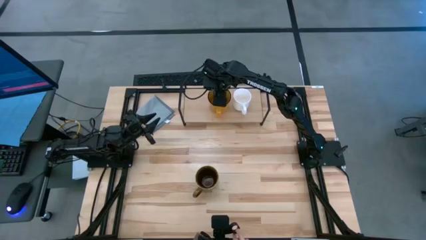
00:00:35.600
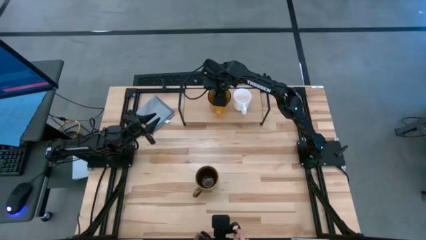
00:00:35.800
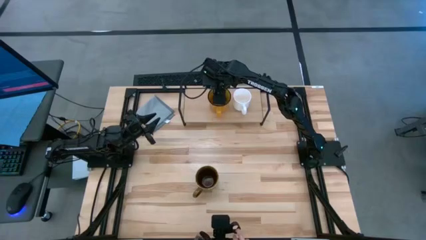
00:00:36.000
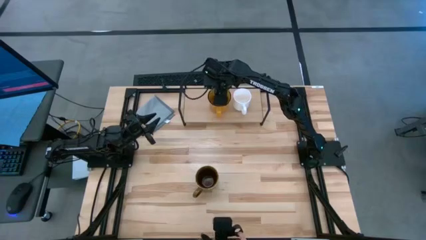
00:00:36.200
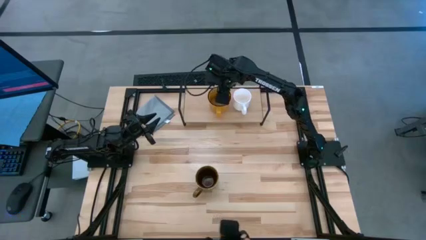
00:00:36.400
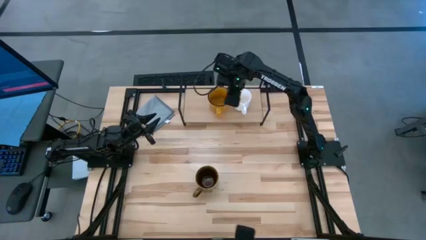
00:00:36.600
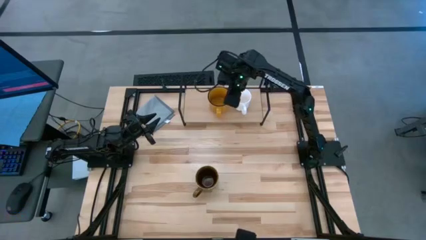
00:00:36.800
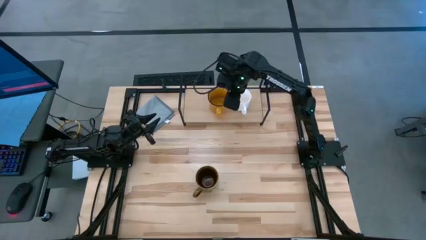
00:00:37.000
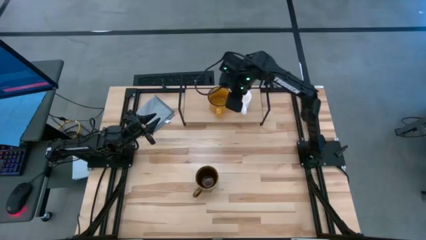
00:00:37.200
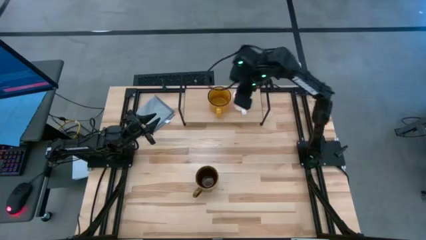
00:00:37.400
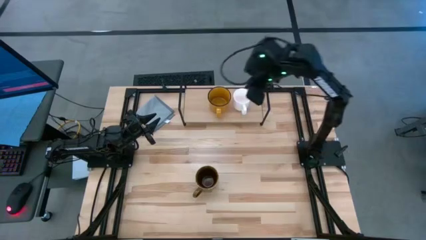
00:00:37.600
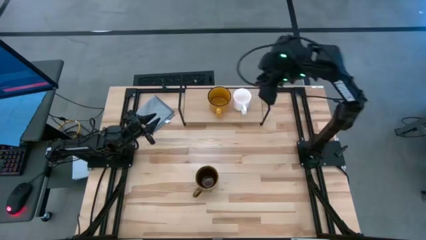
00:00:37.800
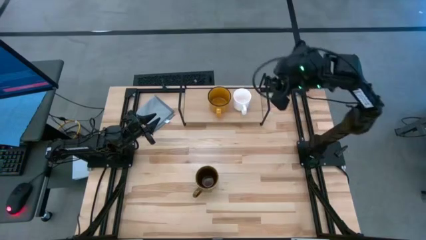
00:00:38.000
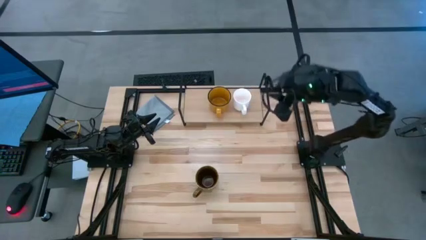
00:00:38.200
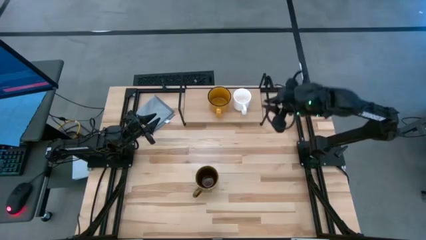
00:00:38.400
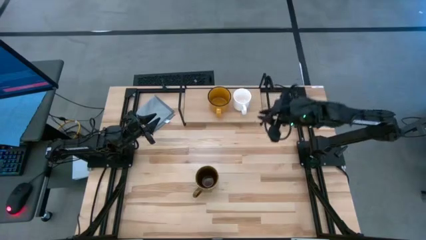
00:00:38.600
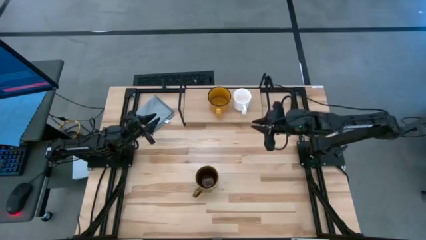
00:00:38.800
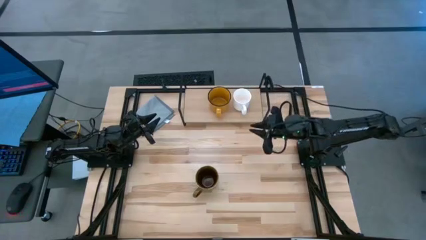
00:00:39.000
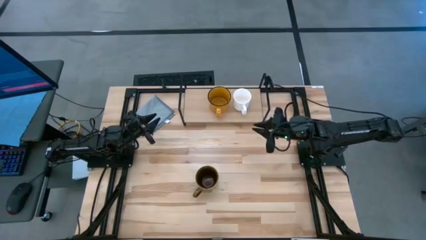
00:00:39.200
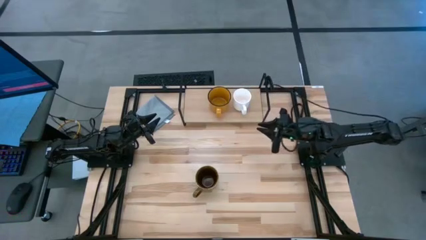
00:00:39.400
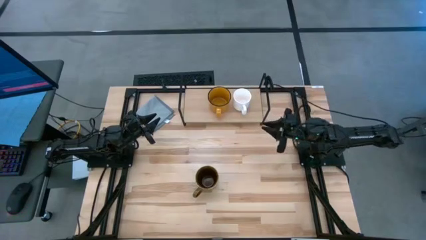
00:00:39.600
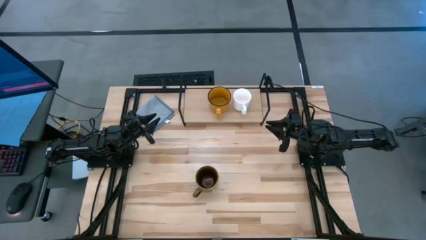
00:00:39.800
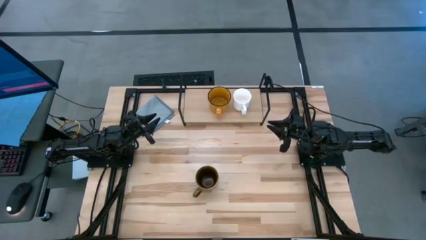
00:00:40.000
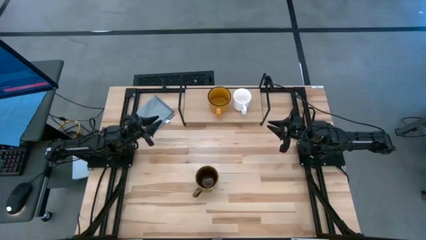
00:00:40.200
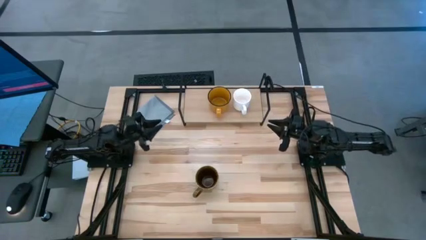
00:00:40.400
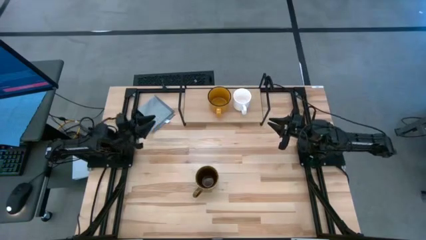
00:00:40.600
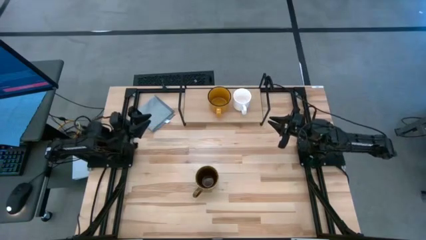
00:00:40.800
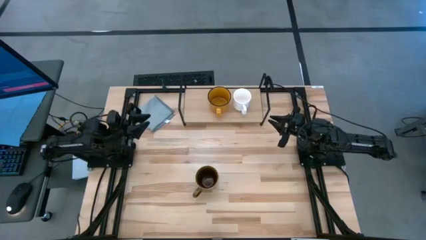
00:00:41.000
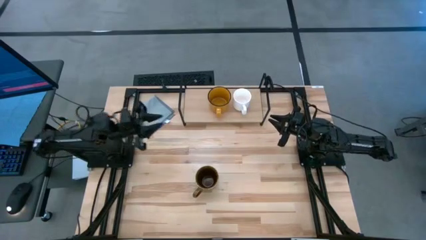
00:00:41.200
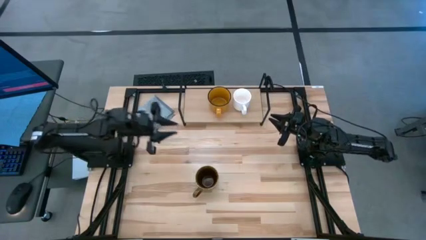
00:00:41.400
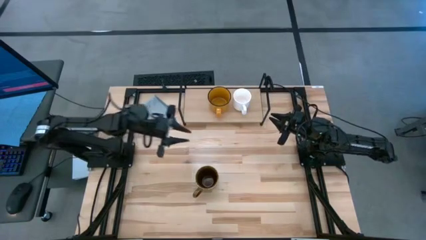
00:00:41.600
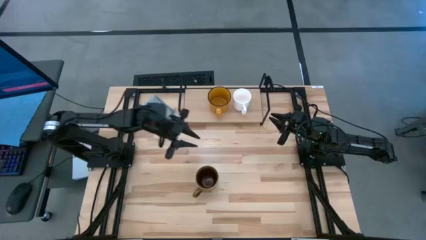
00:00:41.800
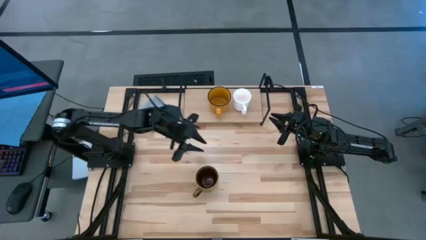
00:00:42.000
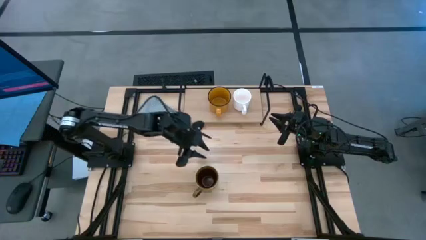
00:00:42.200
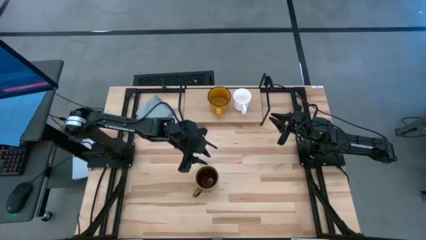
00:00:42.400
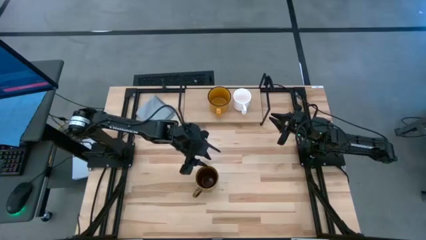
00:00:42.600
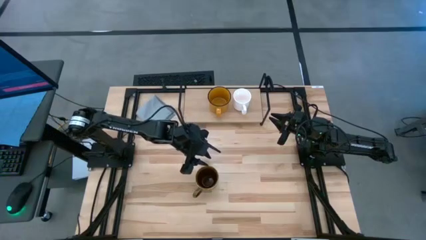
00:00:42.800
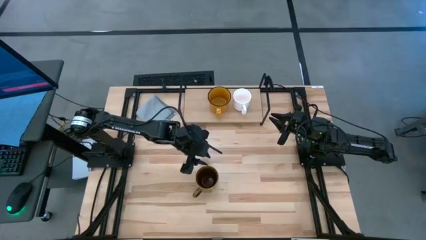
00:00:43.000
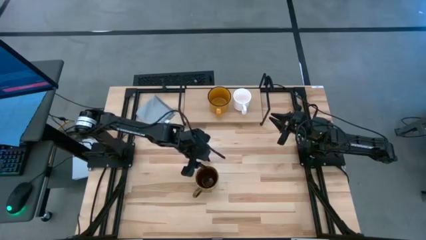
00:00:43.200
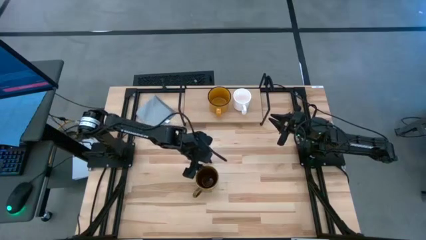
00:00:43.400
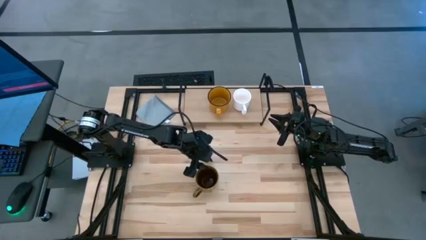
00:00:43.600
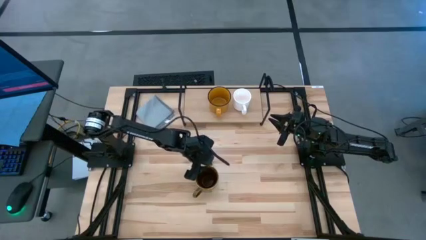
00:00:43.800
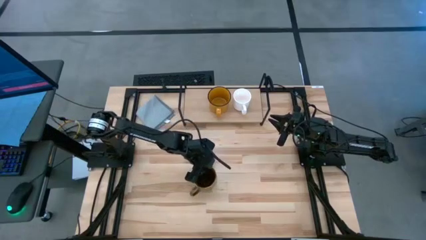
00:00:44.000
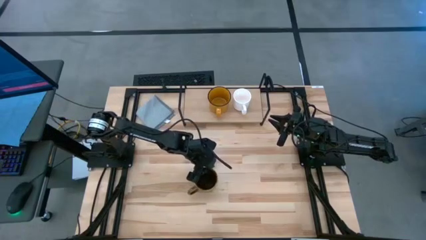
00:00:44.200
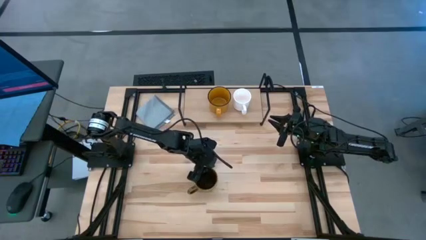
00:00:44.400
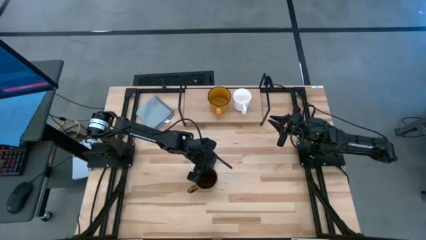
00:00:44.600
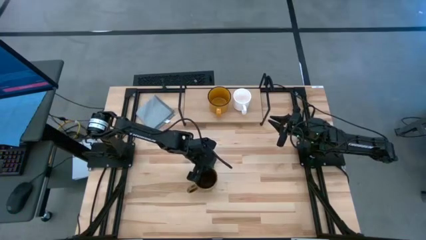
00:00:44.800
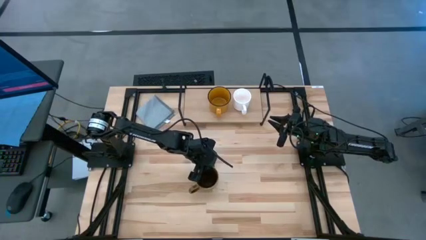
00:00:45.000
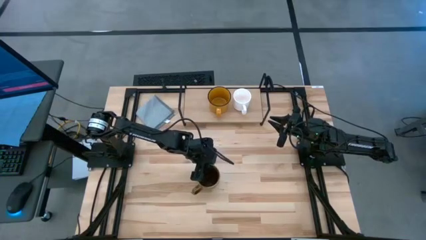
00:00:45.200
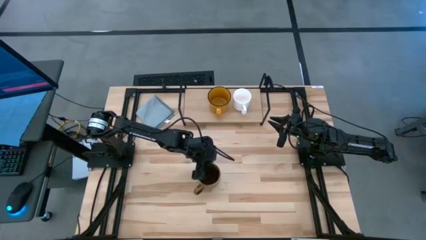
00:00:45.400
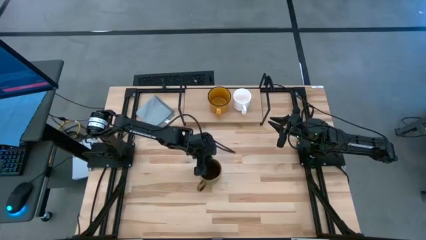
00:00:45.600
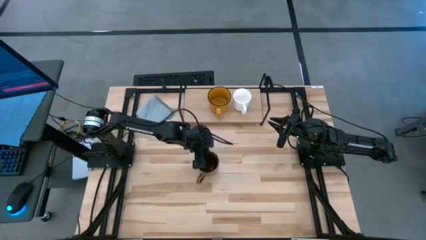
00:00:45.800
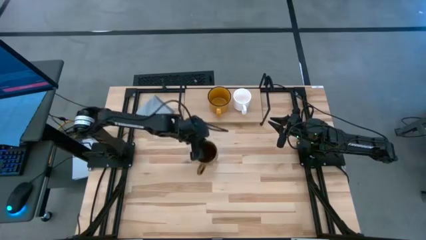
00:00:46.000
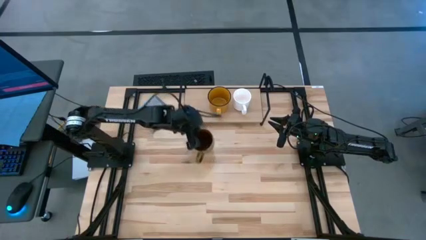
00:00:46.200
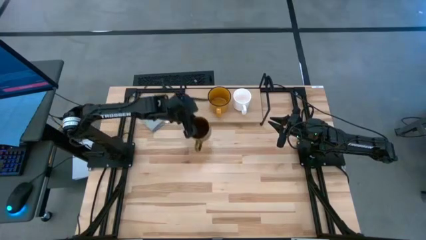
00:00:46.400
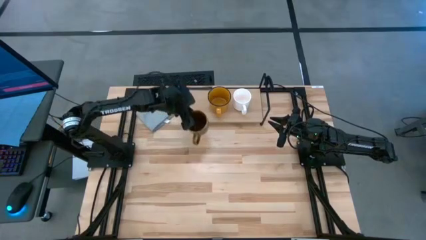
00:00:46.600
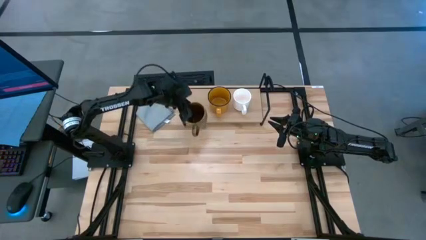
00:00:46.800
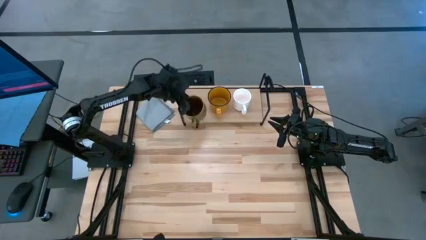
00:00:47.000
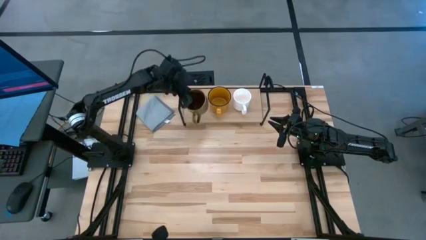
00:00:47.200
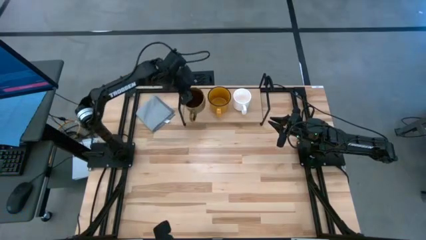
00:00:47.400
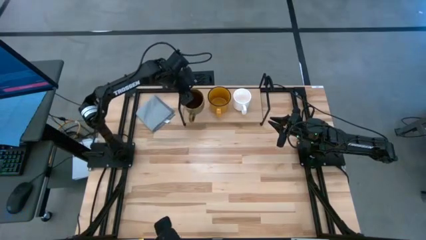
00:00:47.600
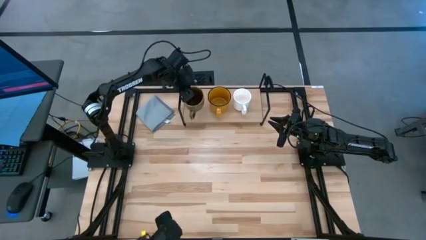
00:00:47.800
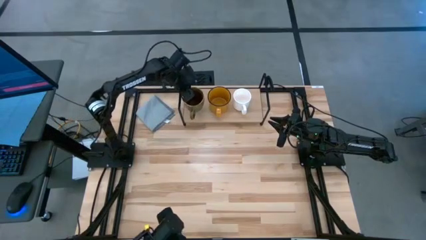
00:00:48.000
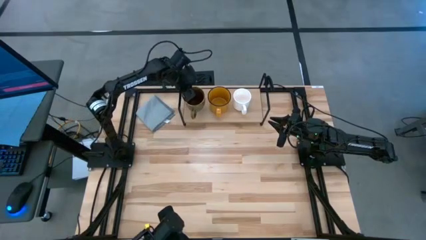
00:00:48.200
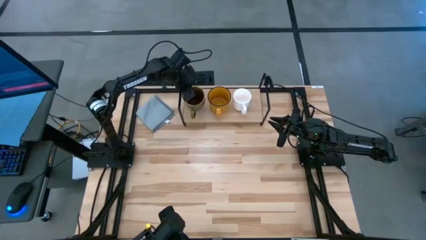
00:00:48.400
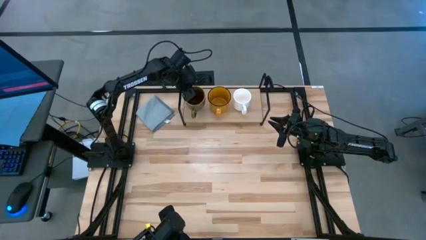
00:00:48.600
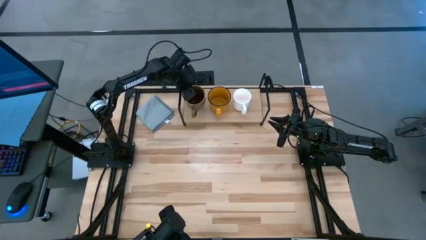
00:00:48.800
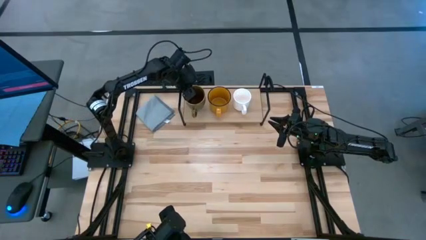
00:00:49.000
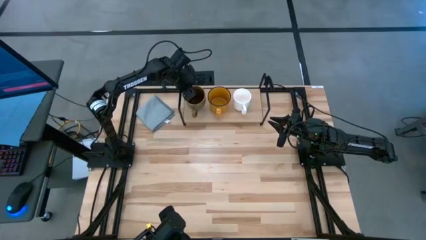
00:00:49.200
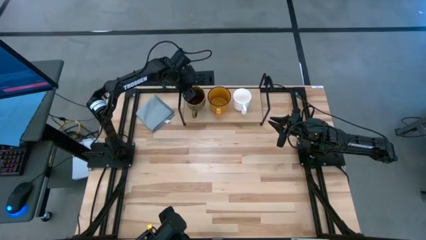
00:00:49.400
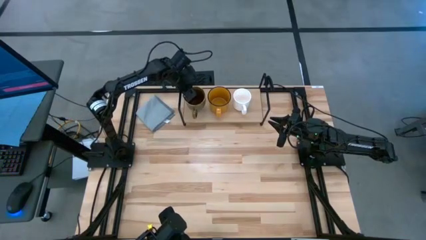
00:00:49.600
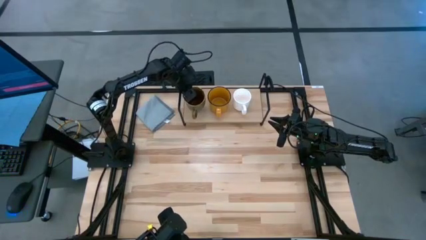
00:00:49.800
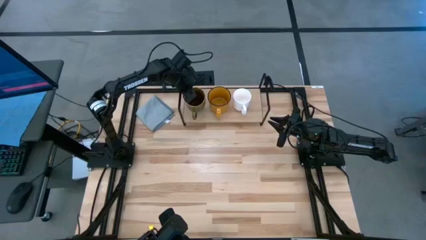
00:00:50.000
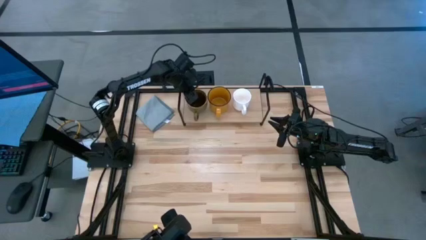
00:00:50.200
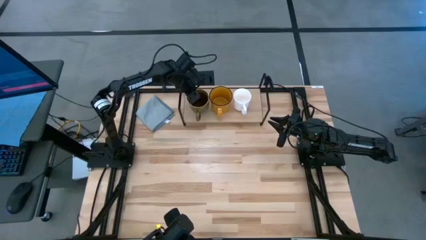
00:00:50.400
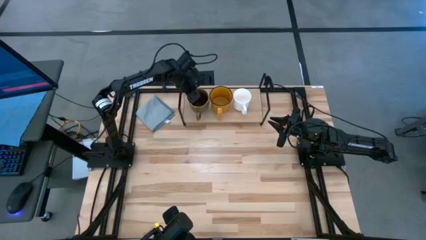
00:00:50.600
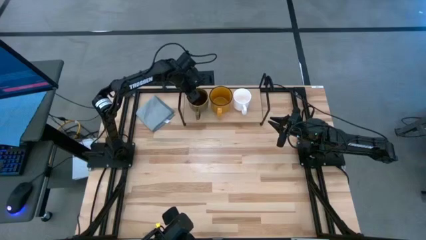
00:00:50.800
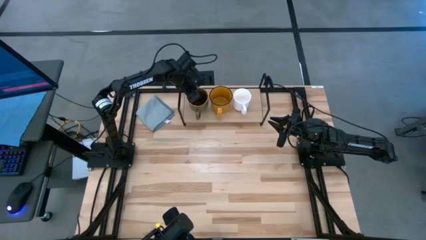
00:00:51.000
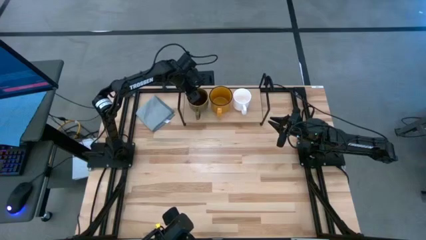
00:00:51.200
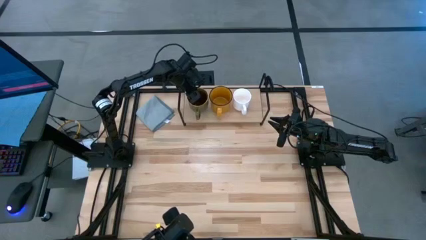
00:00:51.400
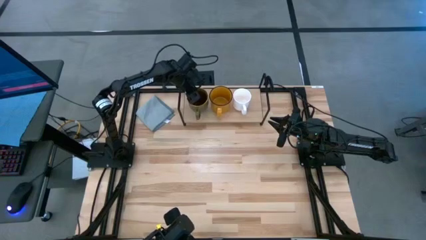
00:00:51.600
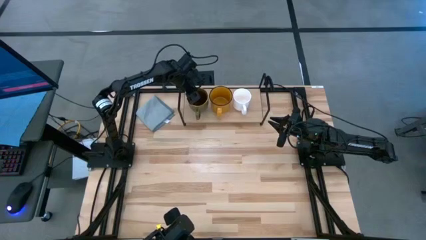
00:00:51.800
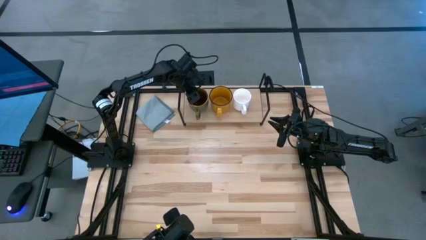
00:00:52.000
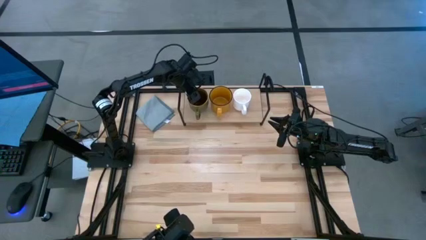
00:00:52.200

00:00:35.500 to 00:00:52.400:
Task: Stack small to large cups/mugs on shelf
Put the brown mug on the shelf
